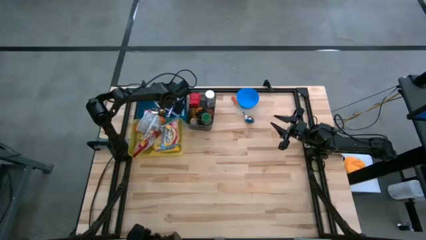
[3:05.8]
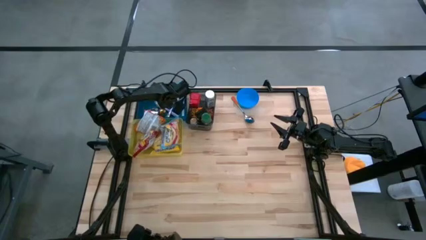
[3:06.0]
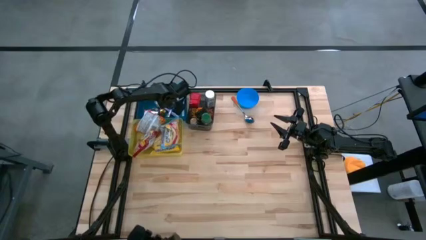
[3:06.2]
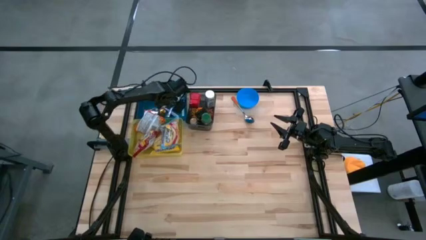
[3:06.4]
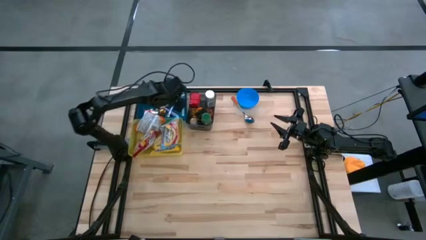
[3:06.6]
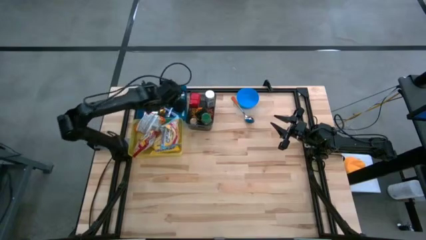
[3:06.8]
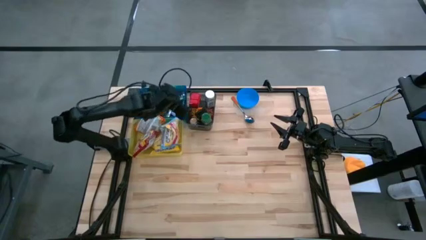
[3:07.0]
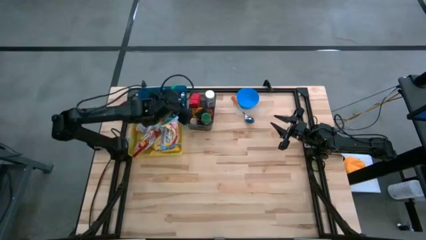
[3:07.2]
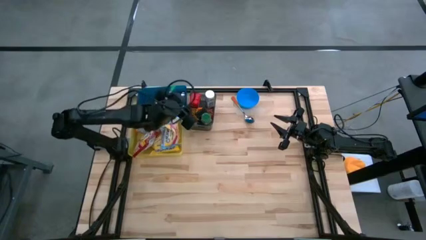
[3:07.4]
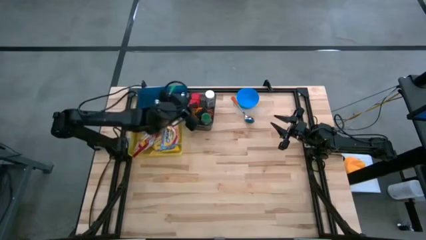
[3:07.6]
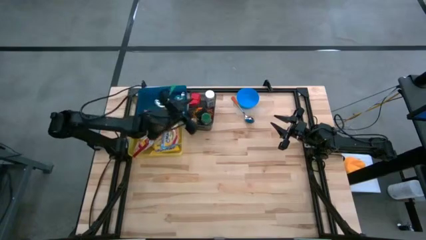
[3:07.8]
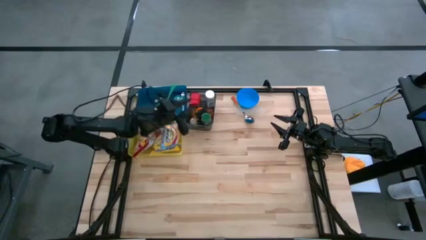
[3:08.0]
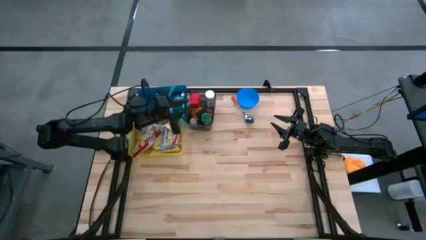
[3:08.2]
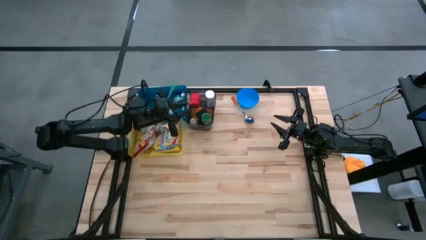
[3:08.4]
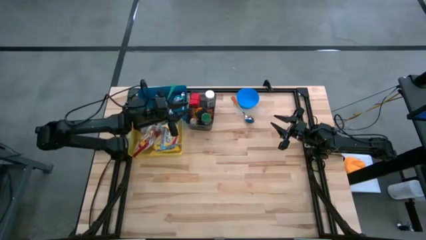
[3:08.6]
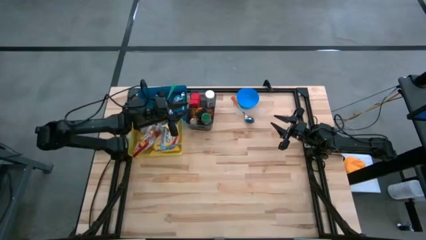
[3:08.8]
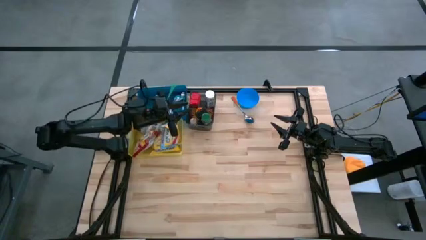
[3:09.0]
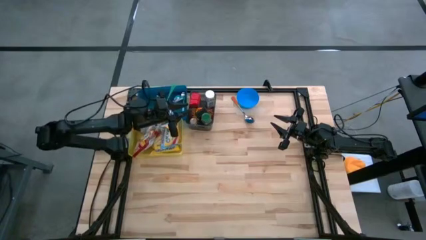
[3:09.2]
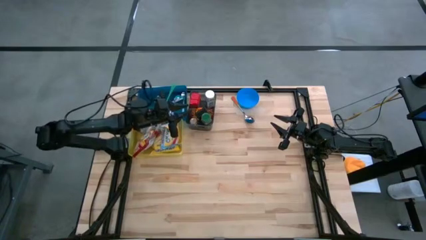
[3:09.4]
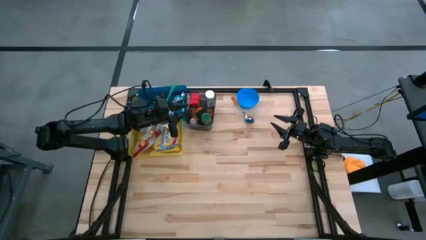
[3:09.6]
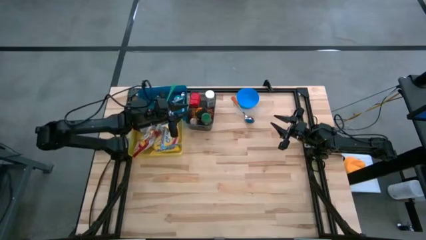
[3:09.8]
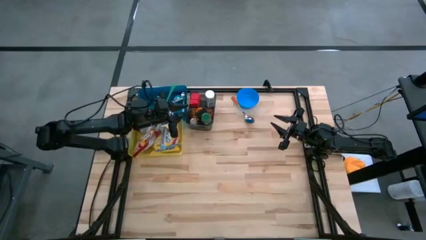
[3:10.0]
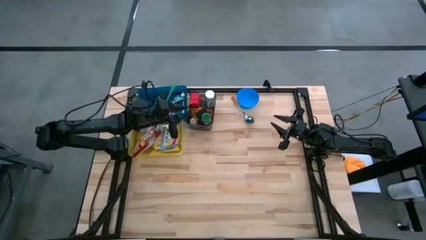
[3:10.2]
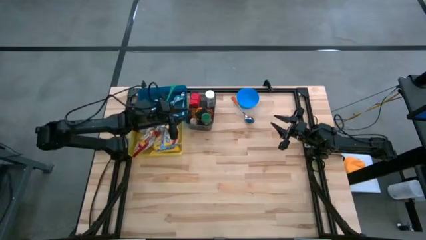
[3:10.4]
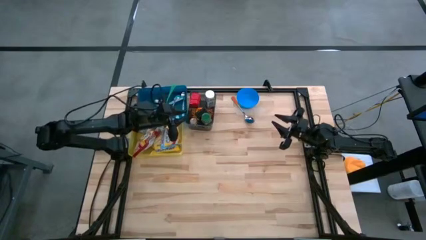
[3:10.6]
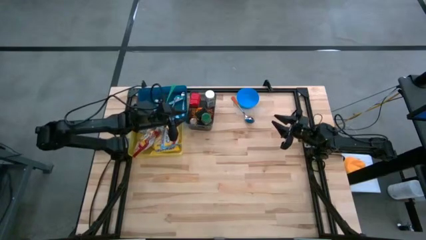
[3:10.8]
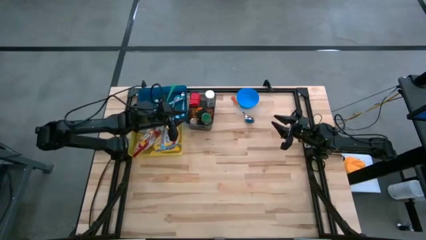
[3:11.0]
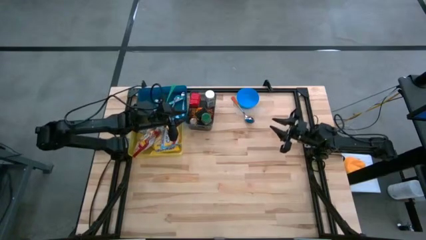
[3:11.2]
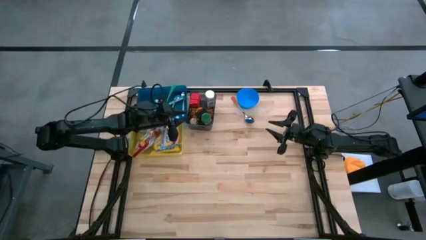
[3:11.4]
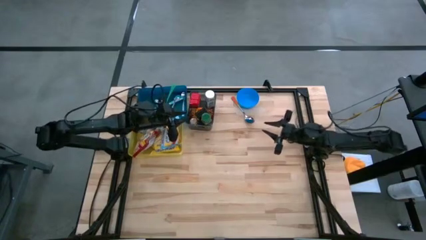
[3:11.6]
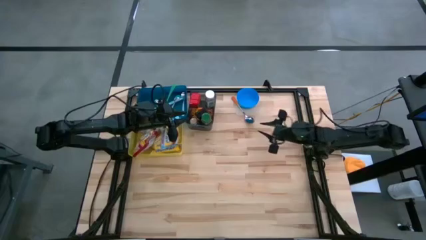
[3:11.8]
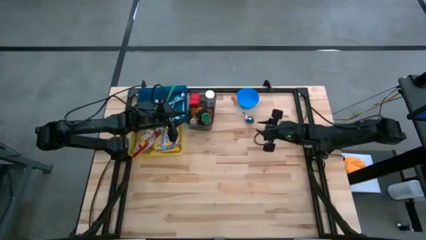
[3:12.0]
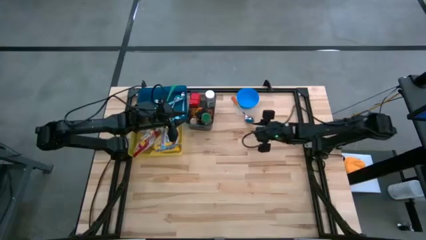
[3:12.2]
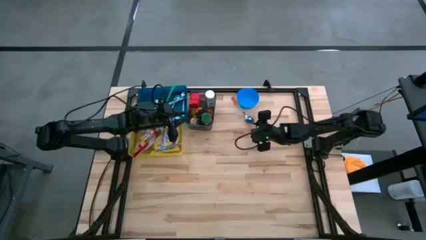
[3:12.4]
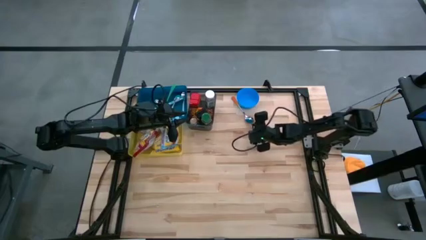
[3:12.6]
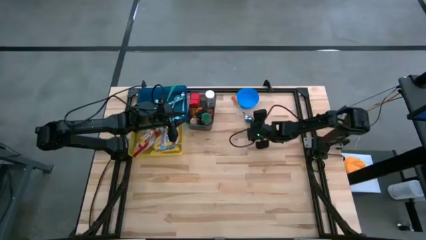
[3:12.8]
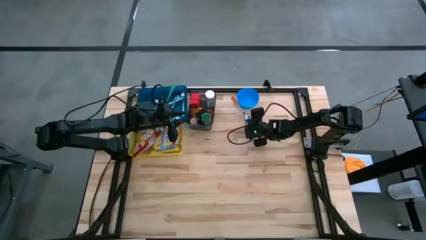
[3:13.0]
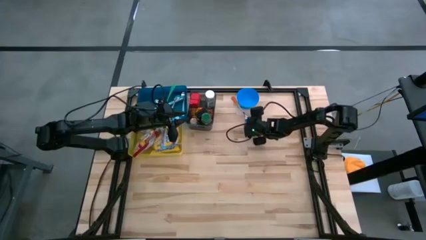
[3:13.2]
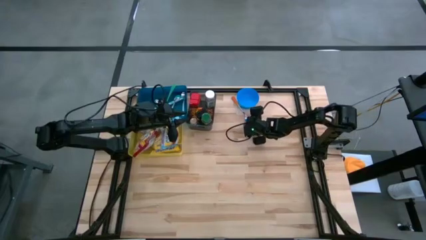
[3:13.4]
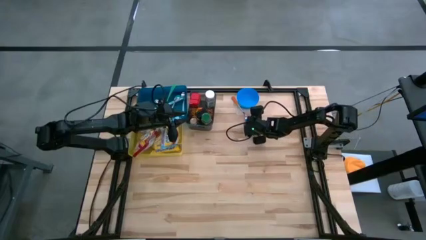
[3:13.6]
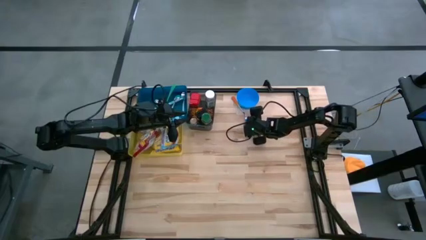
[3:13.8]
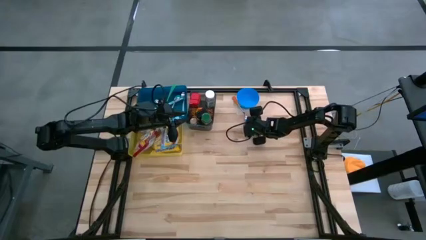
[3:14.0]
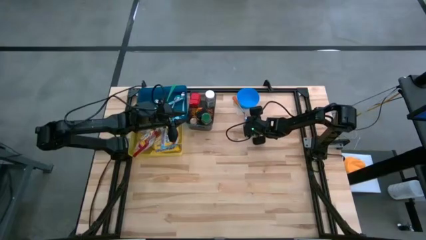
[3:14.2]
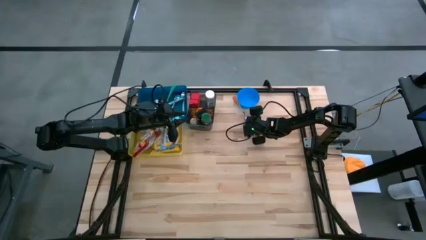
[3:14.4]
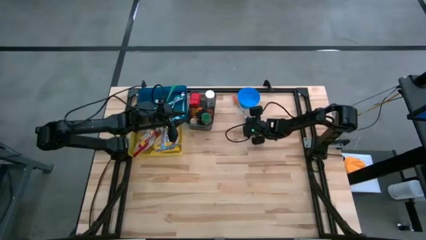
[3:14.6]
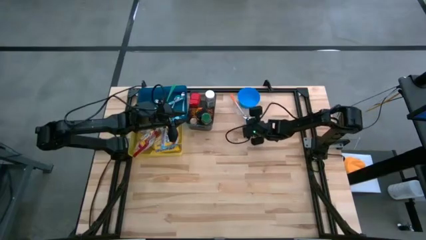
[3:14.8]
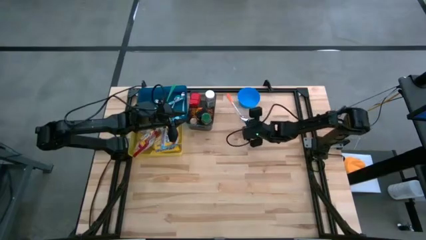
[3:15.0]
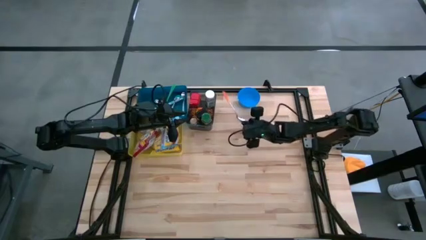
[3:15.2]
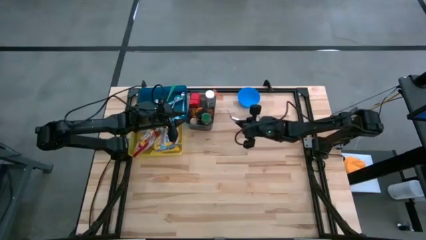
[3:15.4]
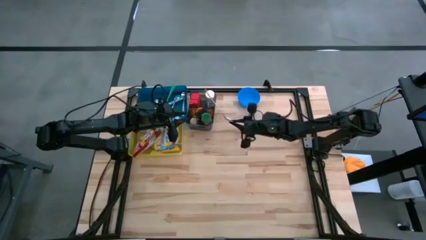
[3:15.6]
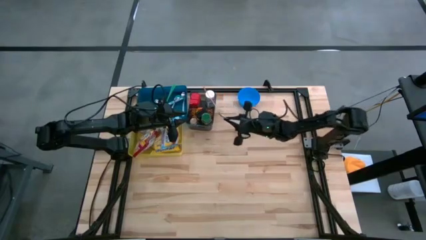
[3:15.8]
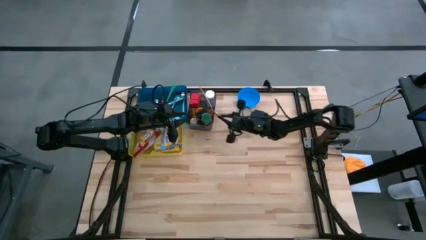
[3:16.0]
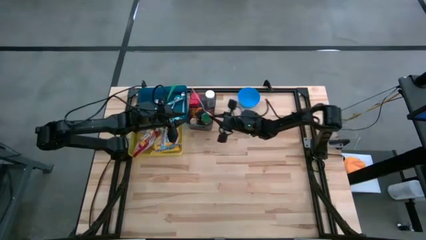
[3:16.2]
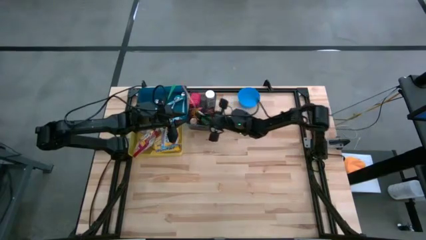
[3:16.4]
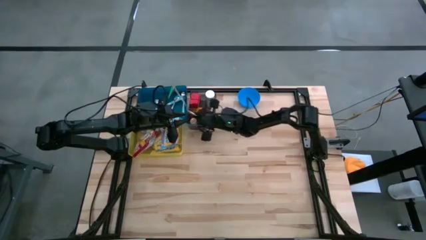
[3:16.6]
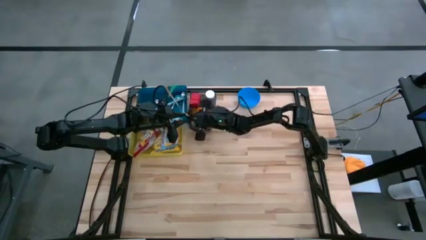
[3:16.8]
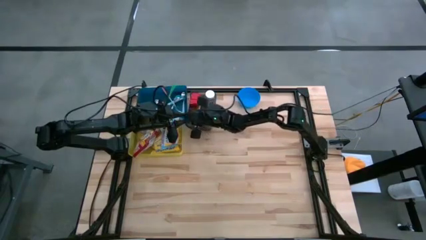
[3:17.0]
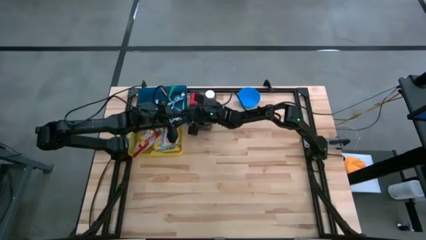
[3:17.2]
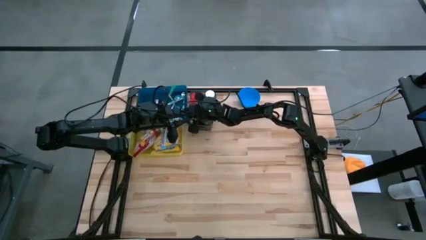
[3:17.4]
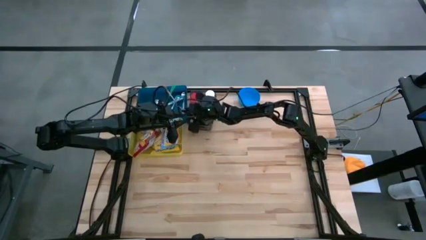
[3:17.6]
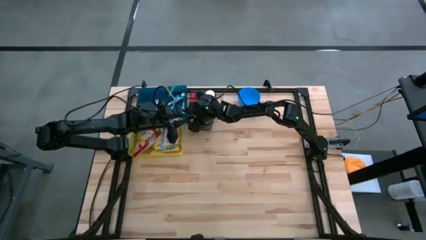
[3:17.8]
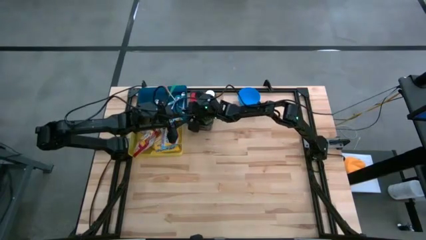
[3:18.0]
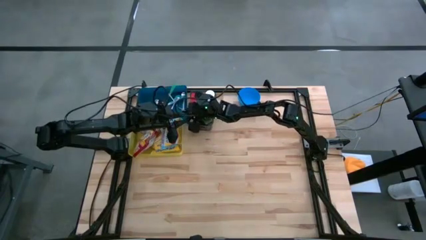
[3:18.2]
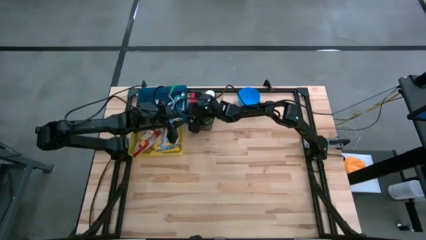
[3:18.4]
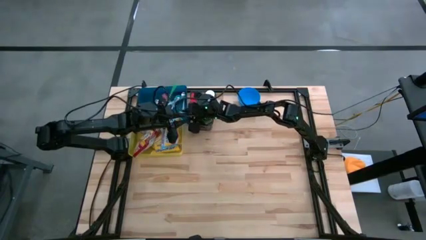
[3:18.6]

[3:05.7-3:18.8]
Put the orange spoon into the blue bin
